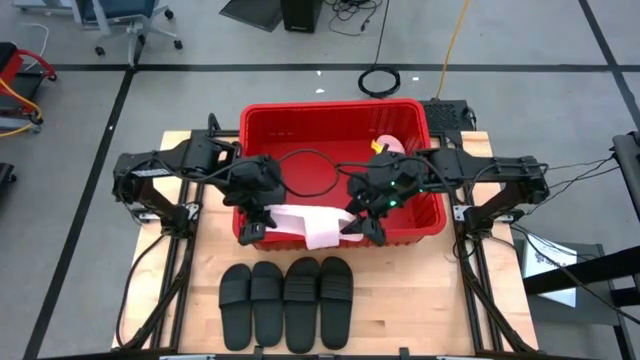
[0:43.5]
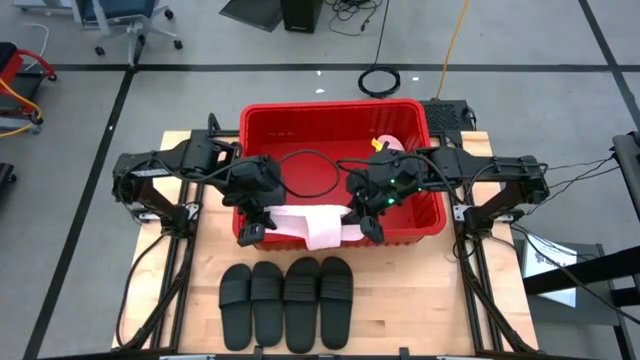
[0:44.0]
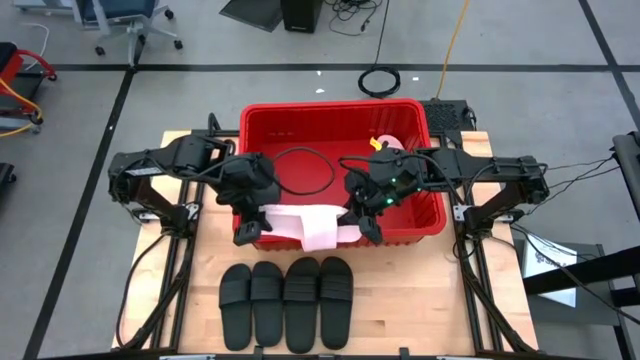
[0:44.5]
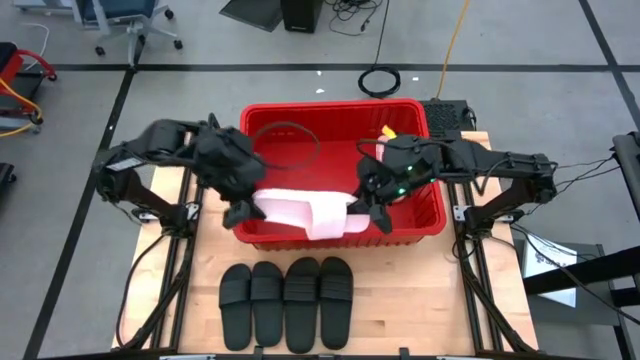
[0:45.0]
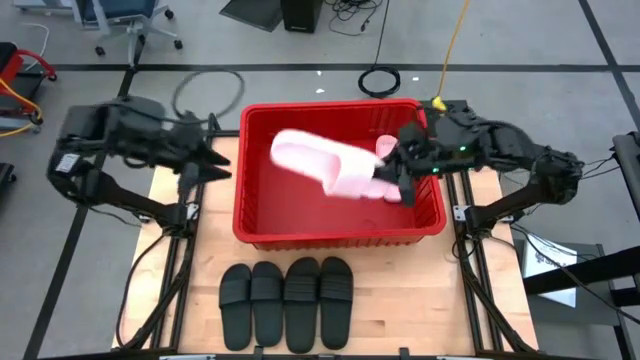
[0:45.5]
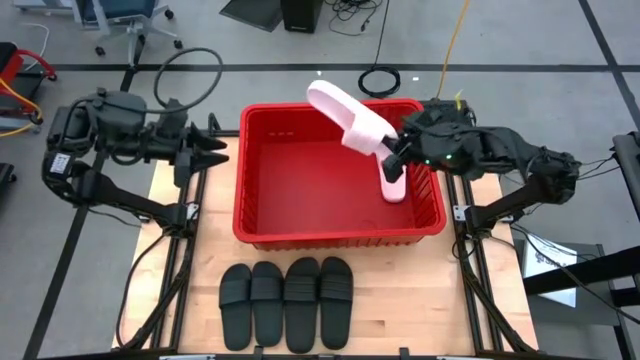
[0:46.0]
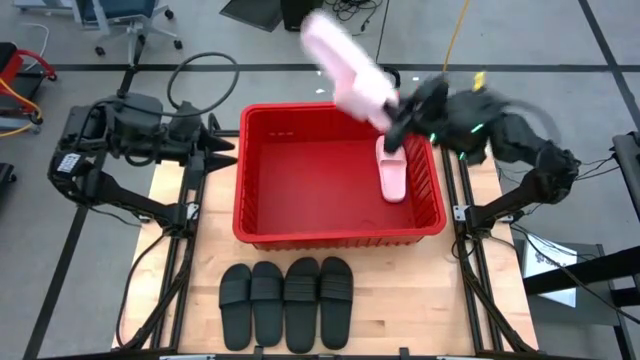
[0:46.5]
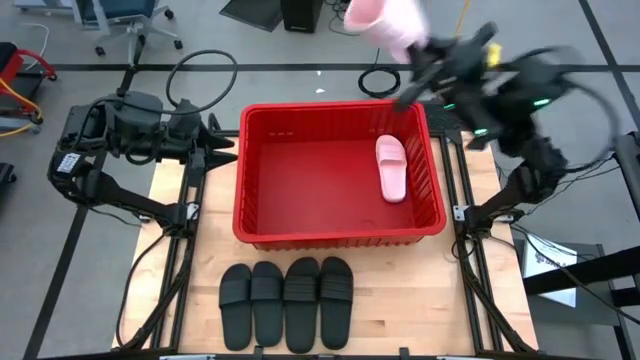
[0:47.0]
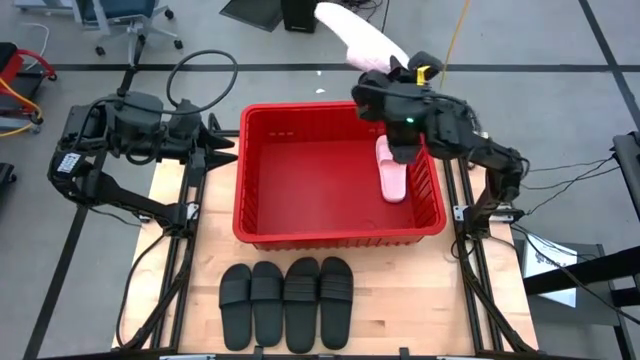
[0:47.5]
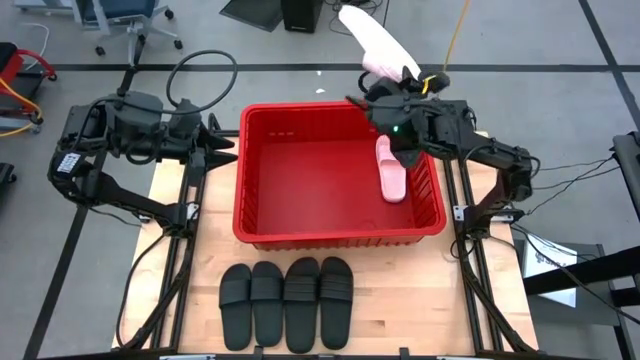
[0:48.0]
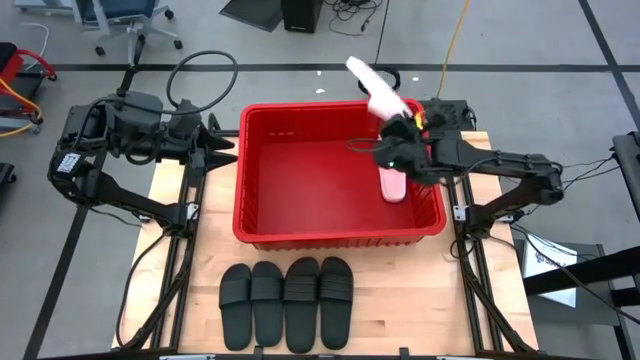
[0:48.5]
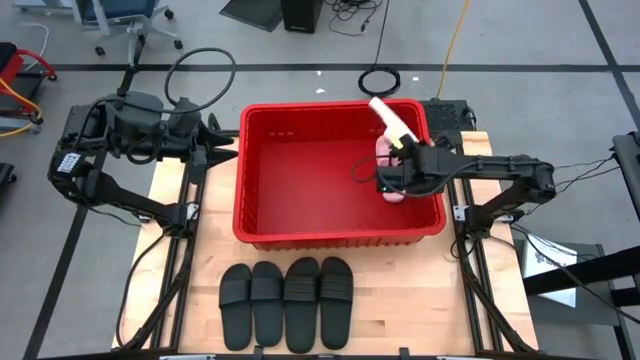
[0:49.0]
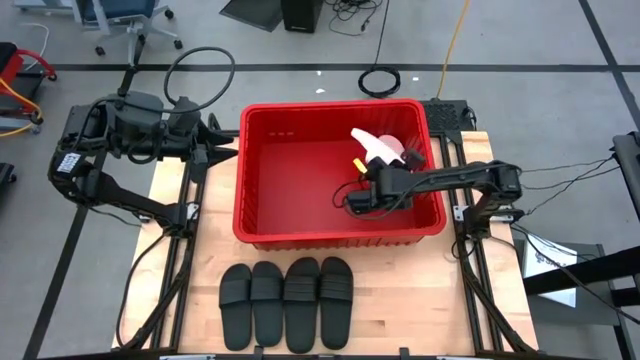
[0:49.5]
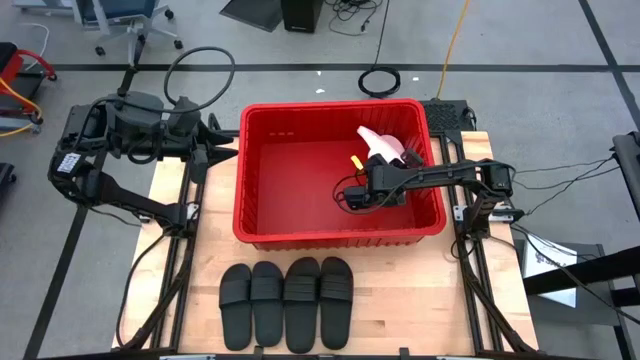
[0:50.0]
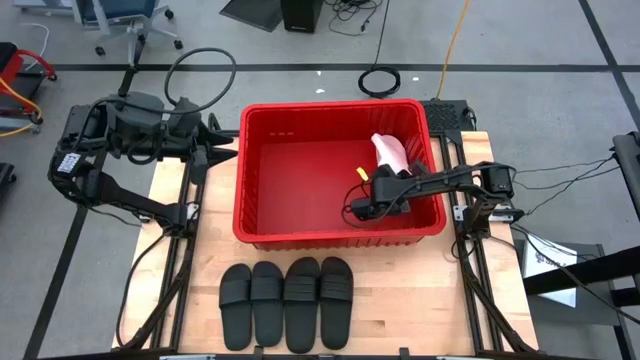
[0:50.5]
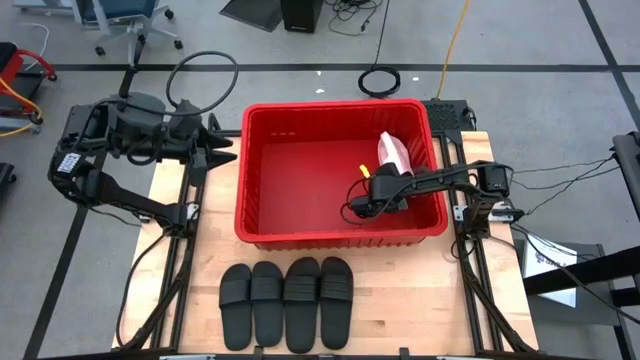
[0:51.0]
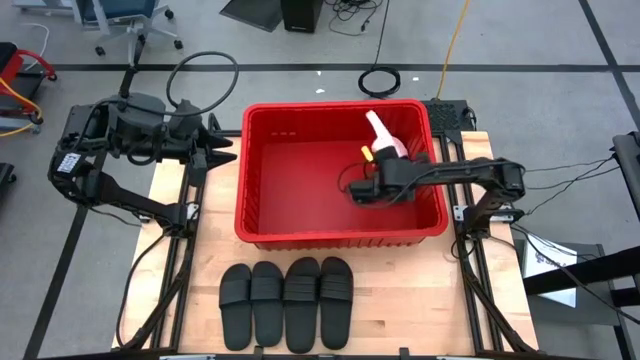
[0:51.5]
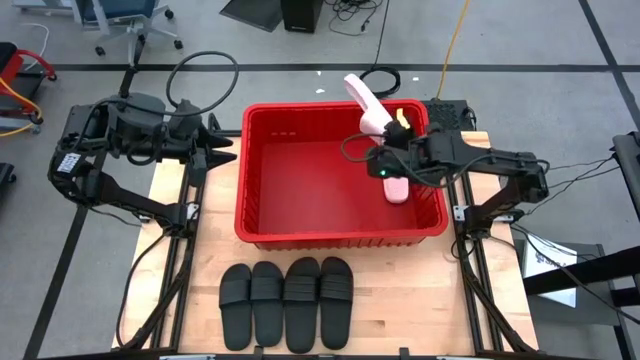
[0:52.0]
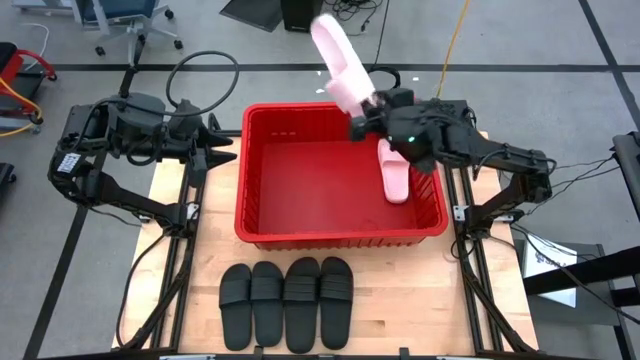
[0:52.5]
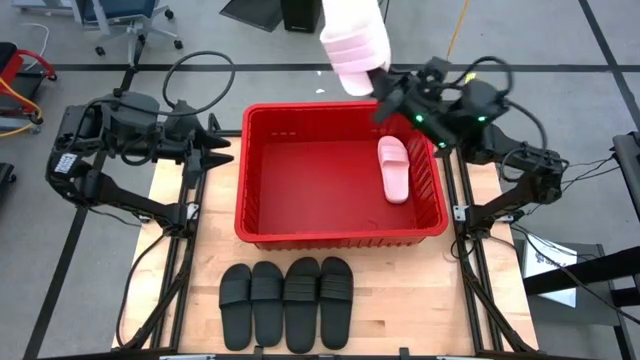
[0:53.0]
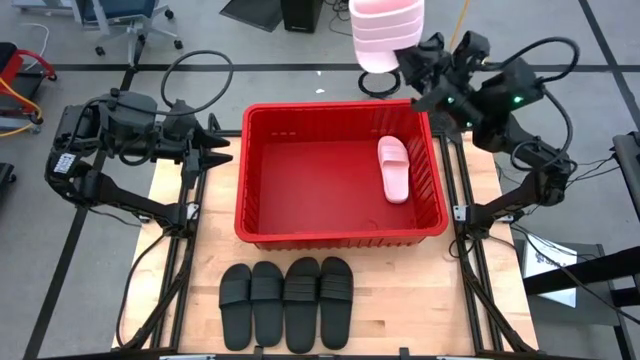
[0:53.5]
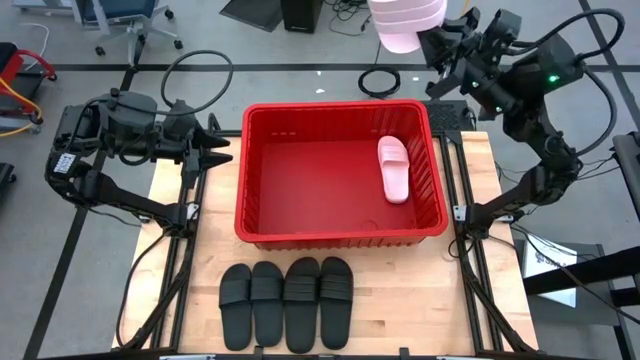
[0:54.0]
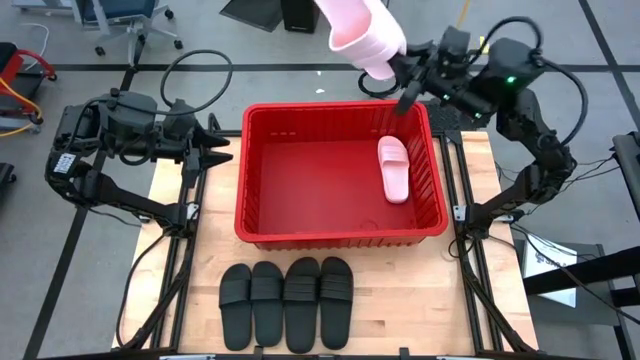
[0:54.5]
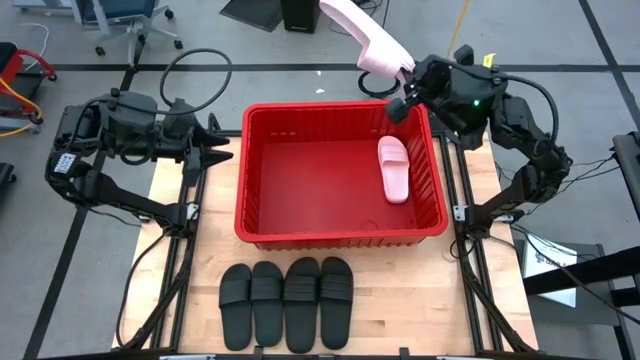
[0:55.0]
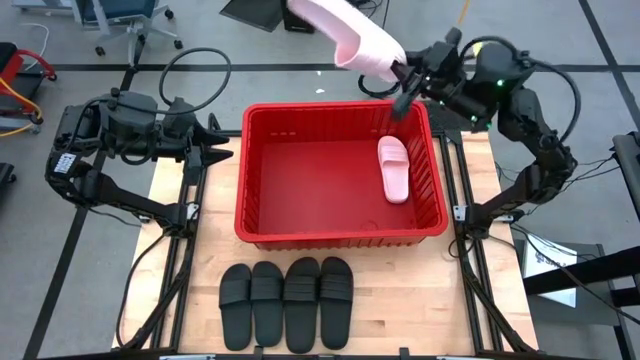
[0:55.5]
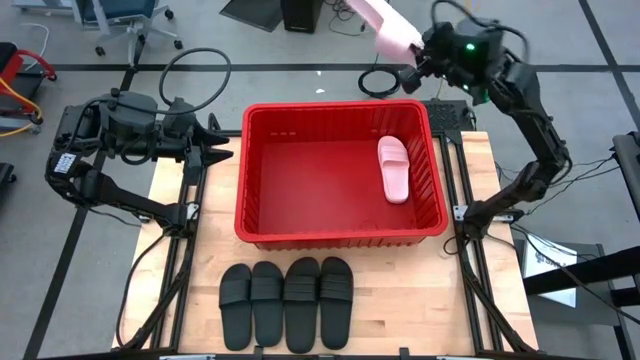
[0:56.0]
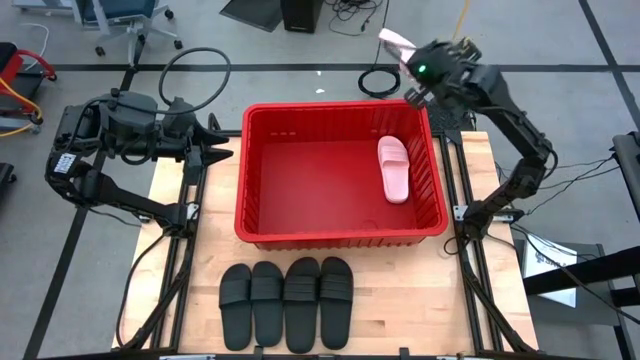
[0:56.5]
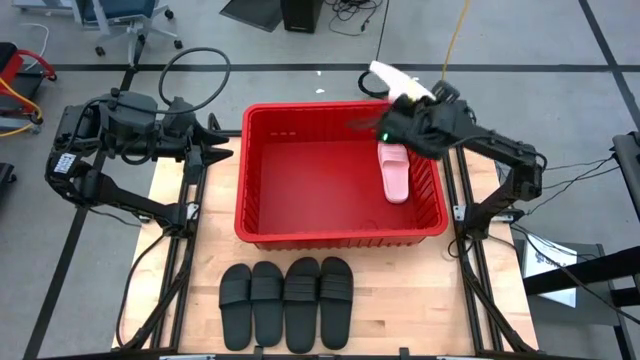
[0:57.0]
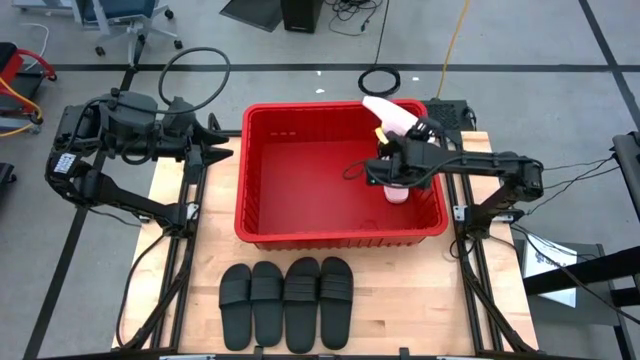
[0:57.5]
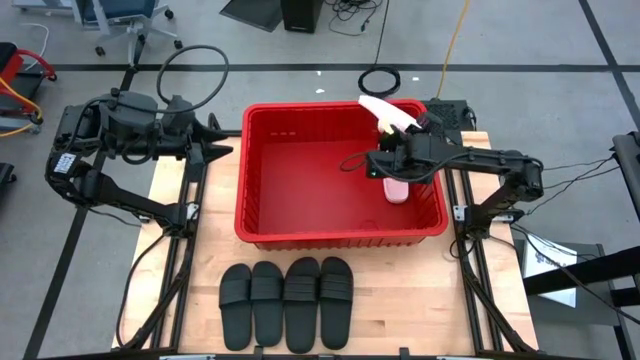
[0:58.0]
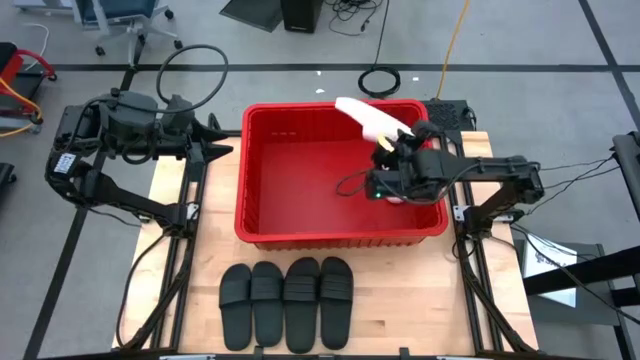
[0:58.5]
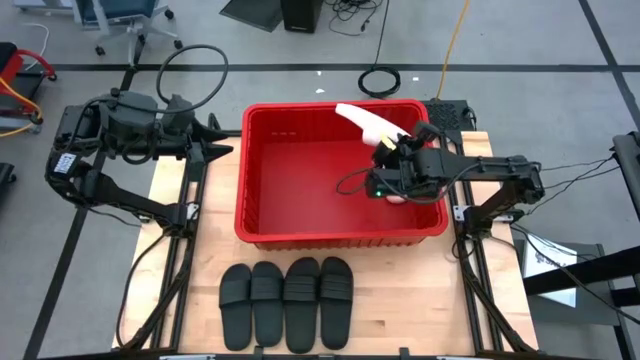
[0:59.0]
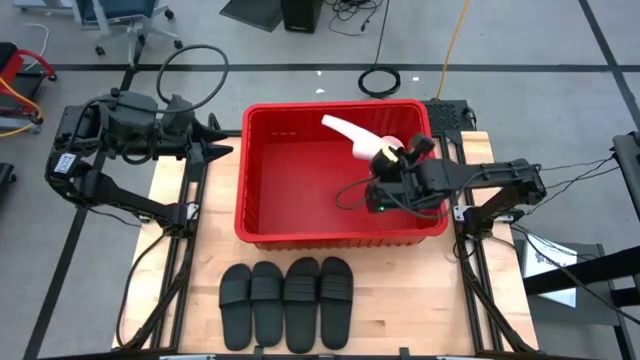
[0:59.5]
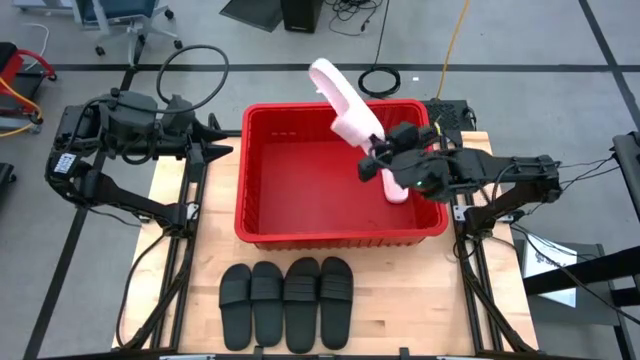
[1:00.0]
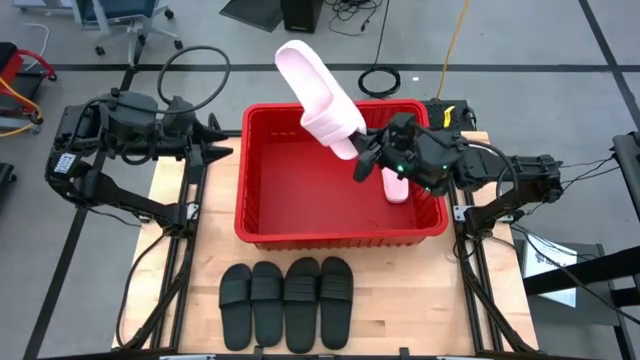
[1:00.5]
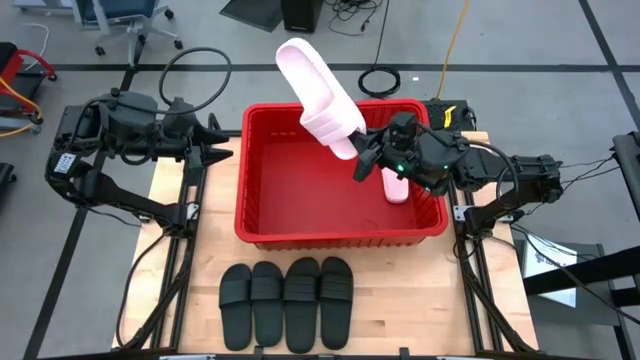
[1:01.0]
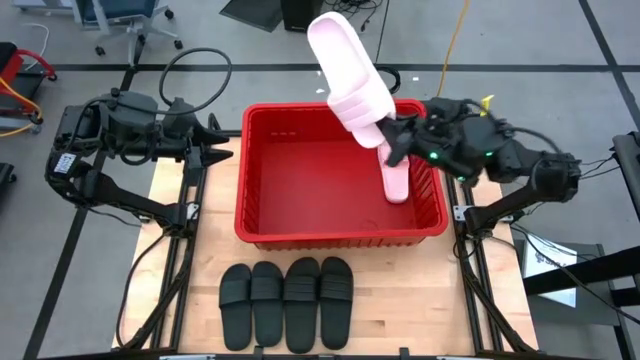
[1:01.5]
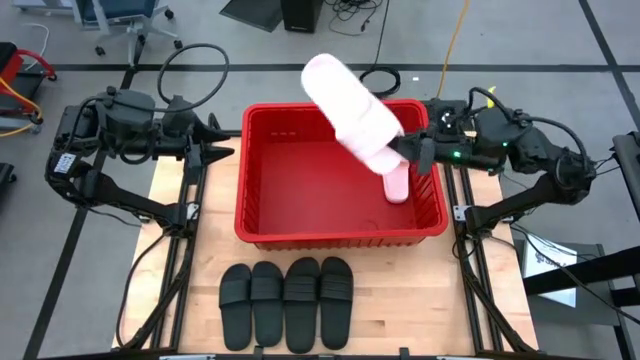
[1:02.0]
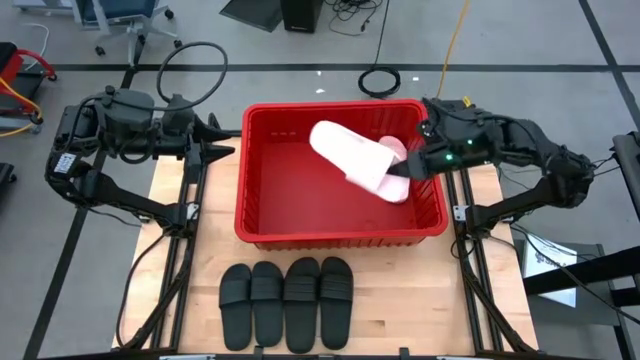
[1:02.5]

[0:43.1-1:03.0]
Task: Pick and place slides into bin
Stack the pink slide on top of the pink slide in the red bin

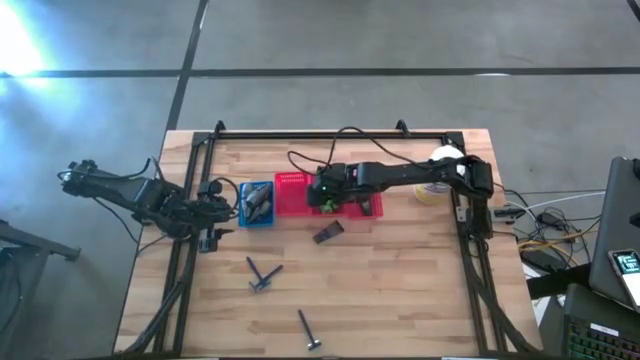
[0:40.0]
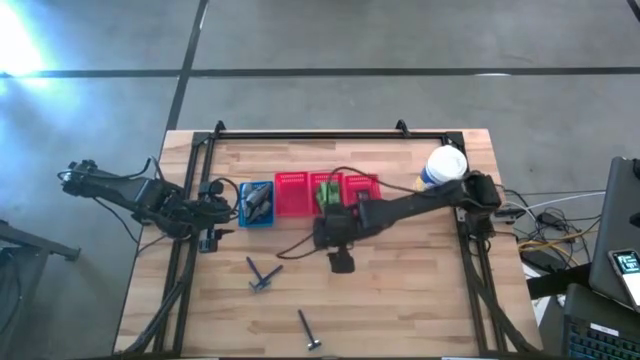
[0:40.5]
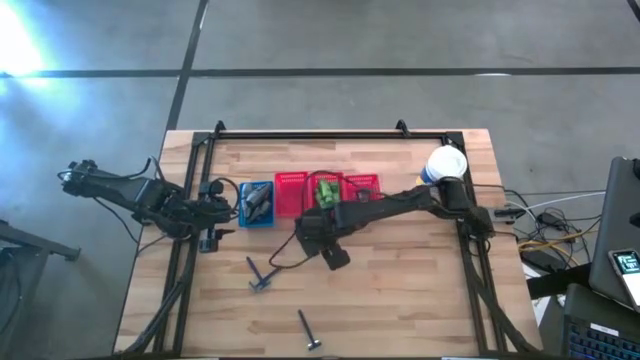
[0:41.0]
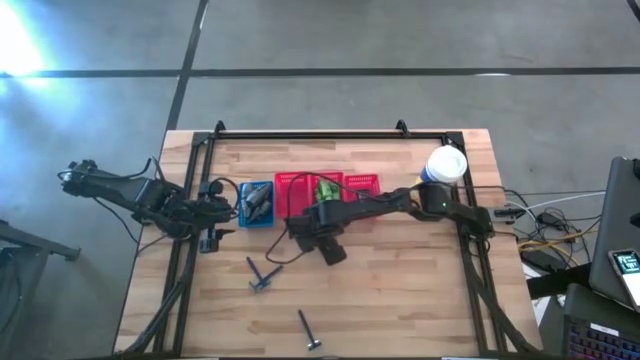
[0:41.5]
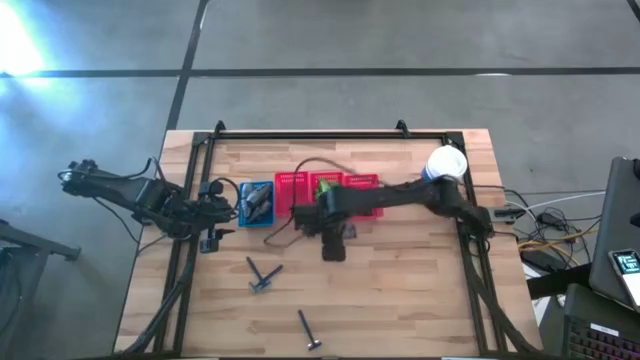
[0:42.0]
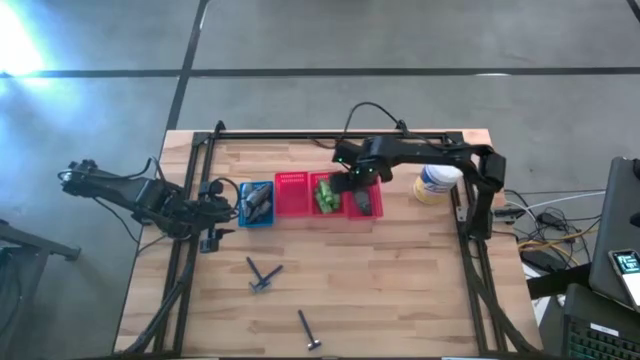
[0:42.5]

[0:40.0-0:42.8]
Task: Pick & Place Travel size toiletries
Put the blue shave cream into the right red bin
